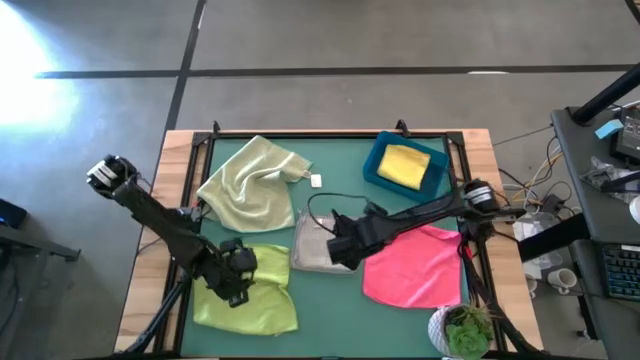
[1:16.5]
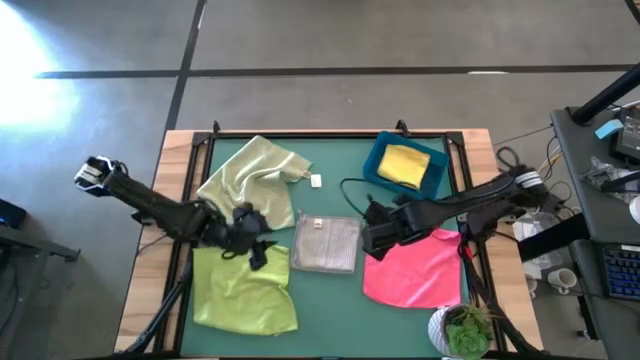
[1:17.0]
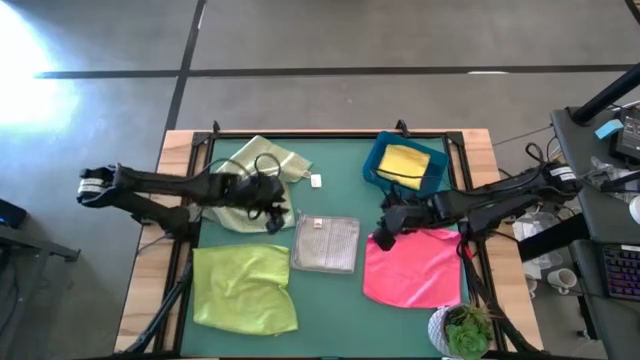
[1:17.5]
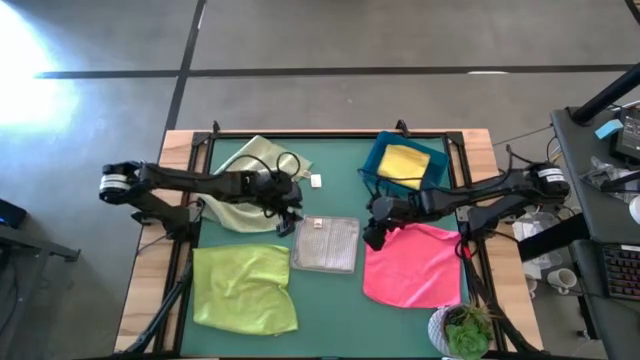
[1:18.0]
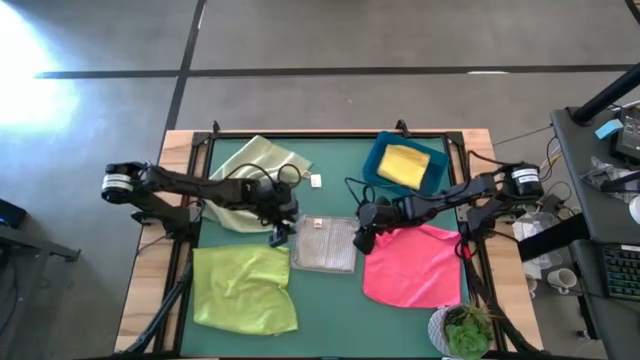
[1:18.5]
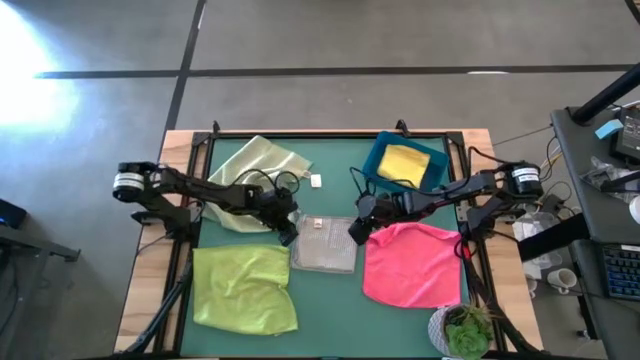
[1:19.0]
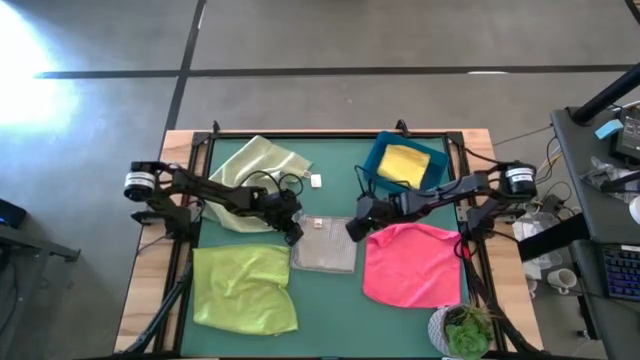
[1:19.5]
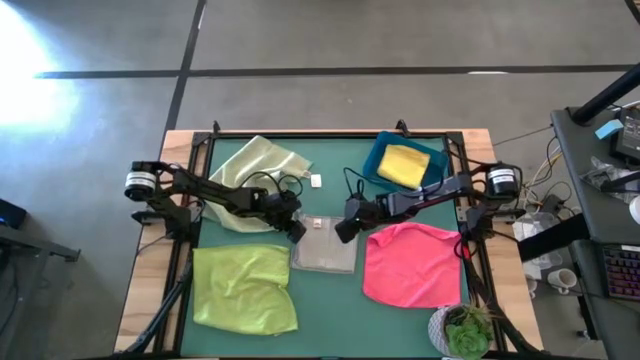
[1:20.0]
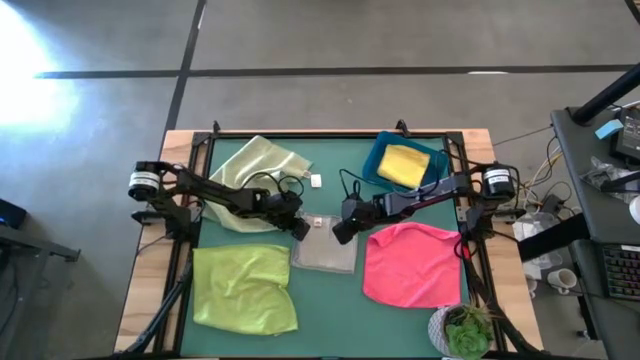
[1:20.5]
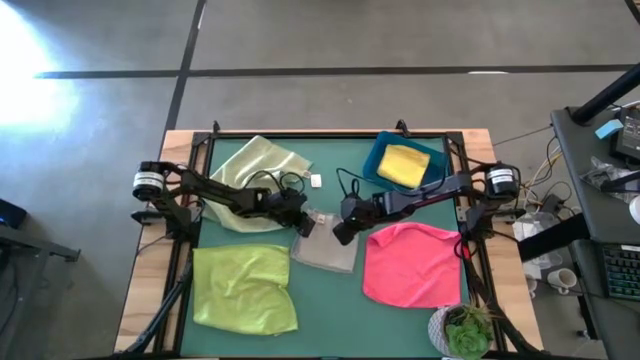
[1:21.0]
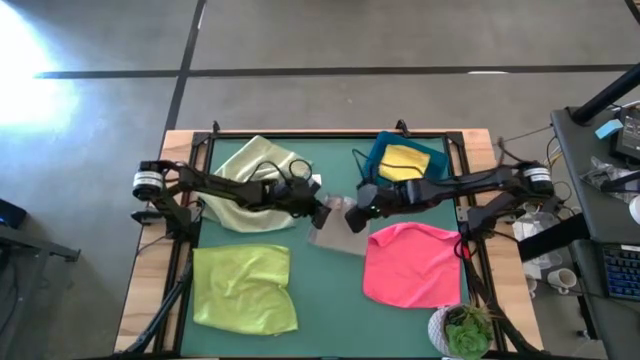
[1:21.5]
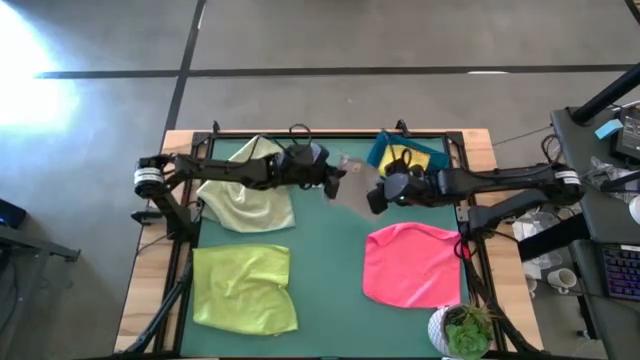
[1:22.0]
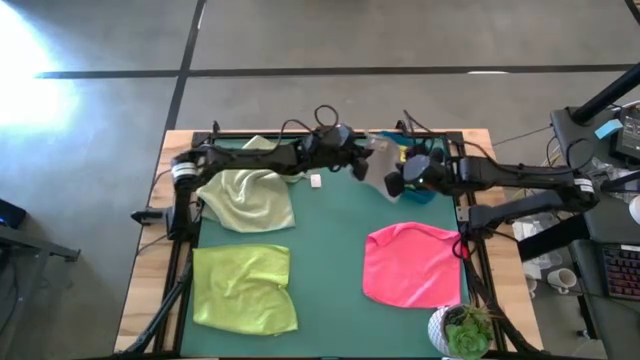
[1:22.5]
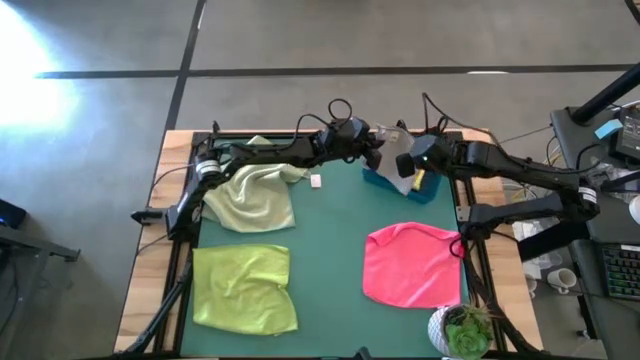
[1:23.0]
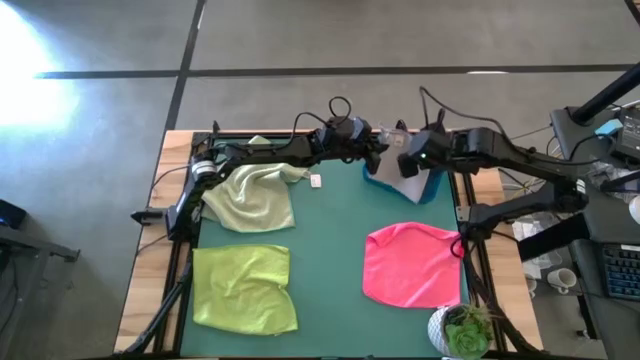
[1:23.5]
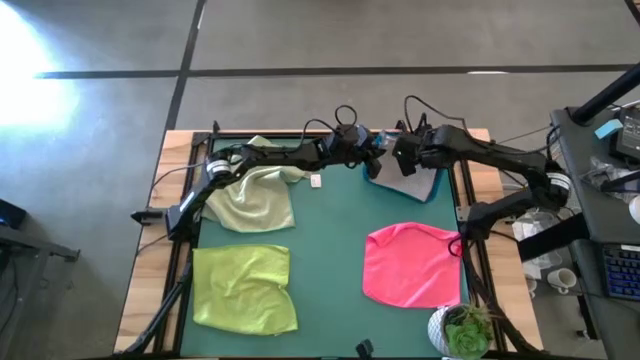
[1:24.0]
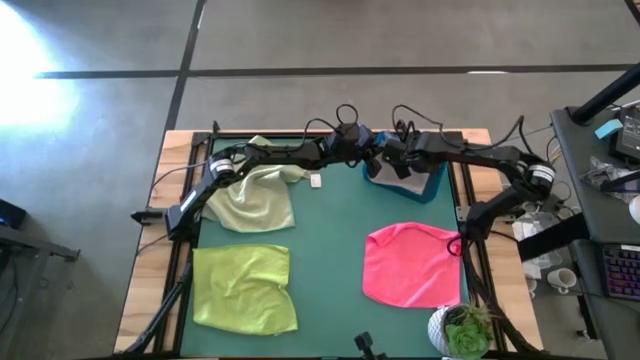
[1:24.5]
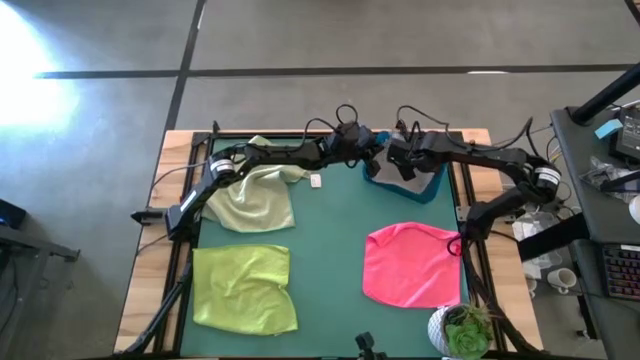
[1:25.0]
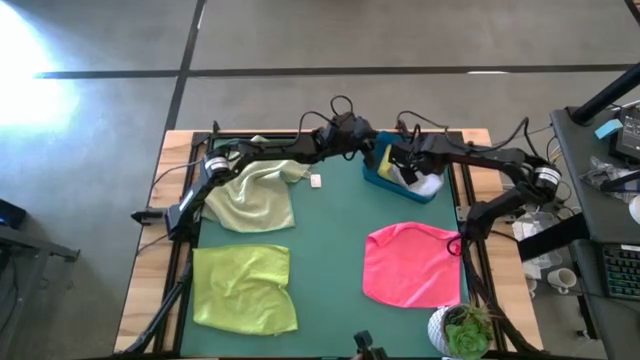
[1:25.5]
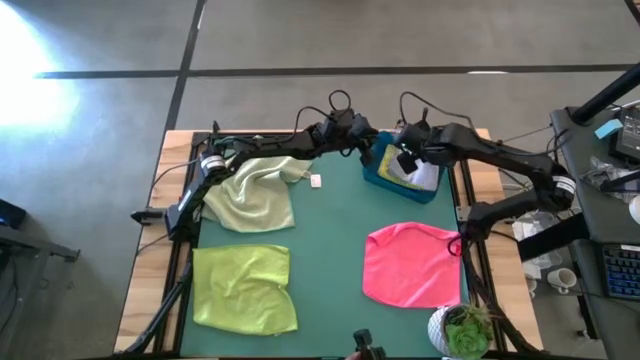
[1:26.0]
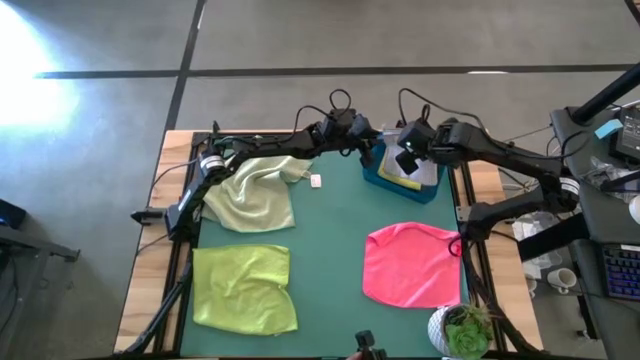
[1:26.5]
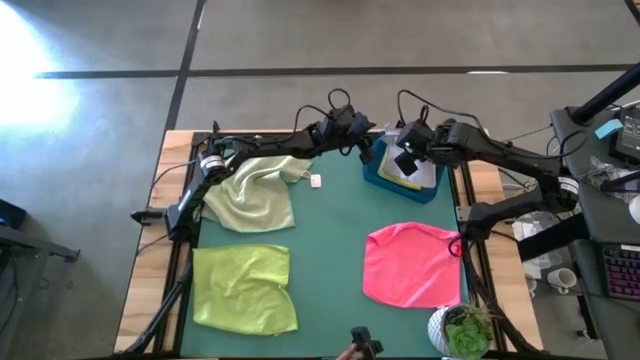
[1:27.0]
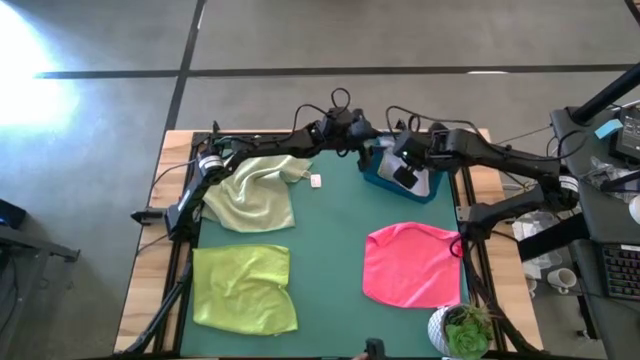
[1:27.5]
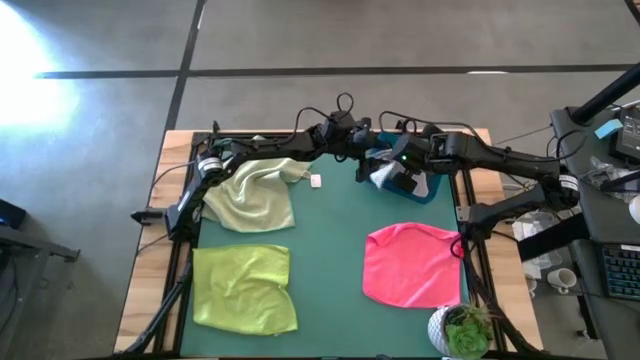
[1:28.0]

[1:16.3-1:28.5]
Task: Fold microfiber towels
Put the folded gray microfiber cloth into the blue bin

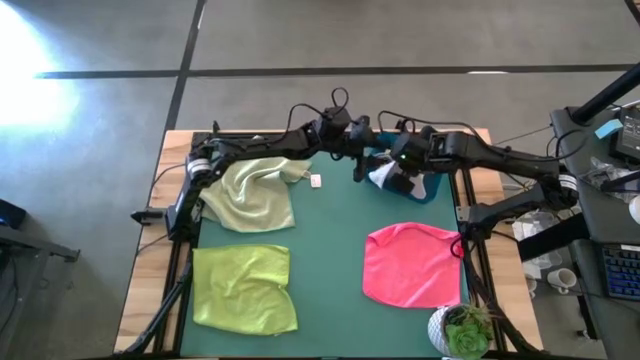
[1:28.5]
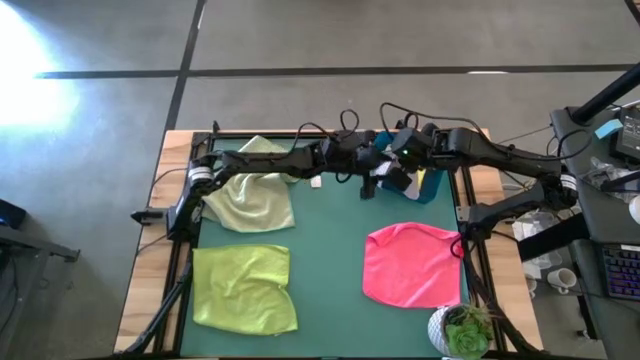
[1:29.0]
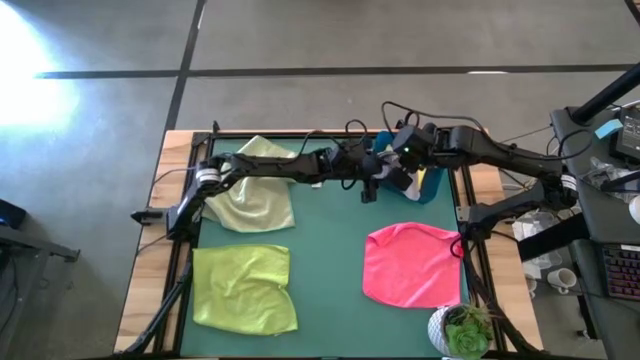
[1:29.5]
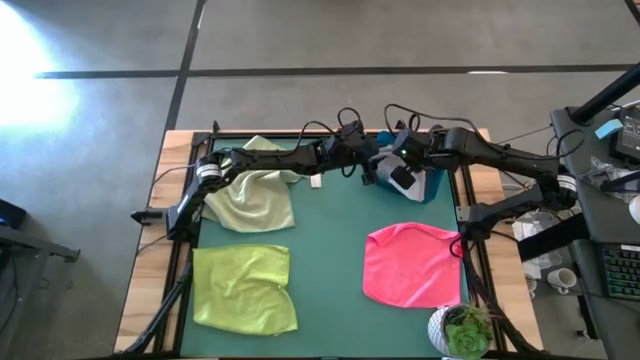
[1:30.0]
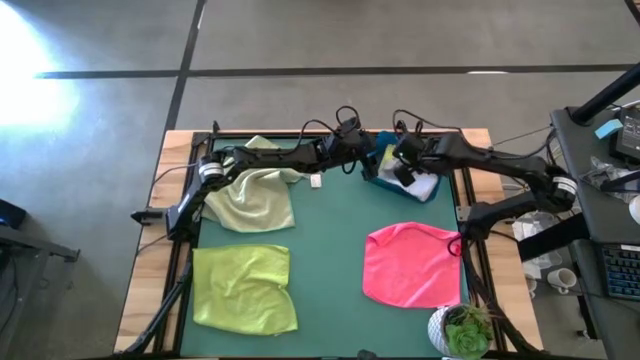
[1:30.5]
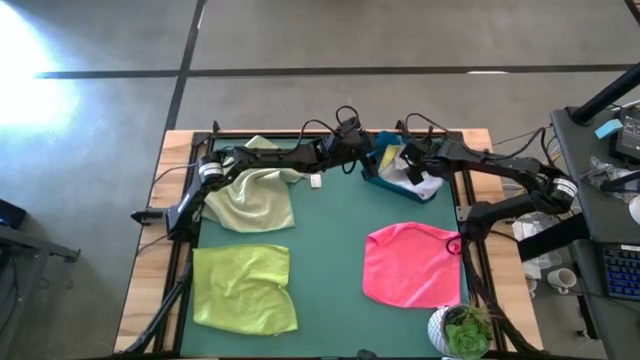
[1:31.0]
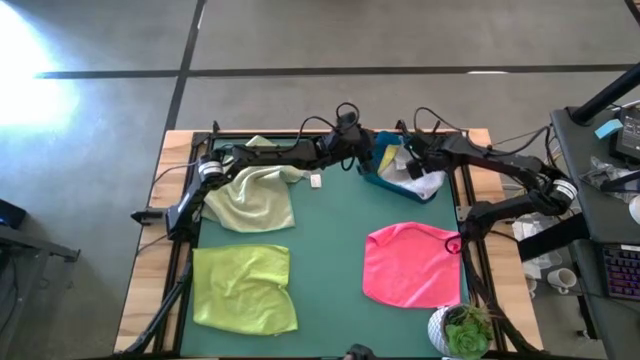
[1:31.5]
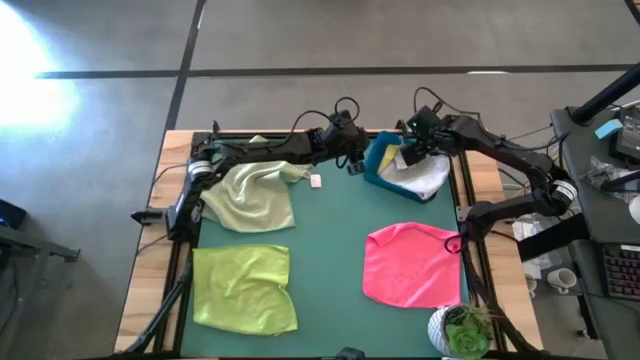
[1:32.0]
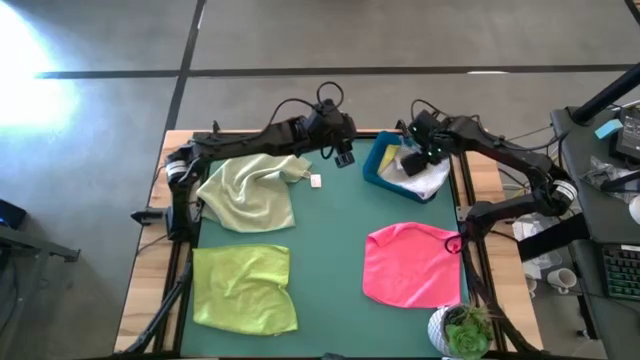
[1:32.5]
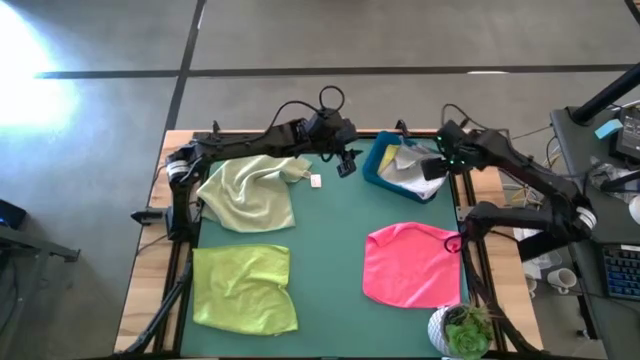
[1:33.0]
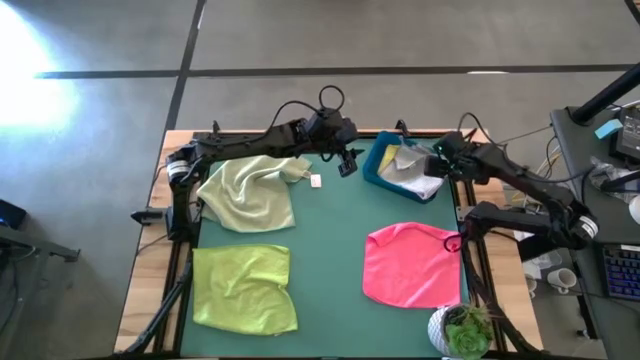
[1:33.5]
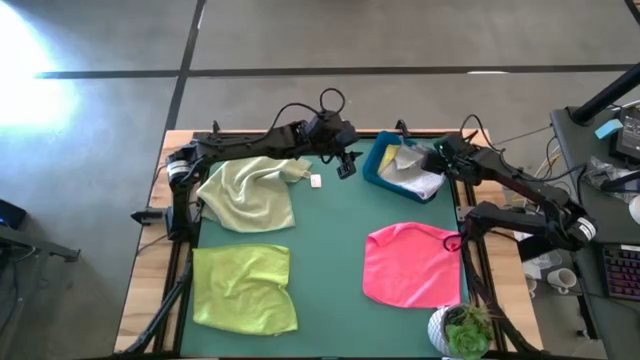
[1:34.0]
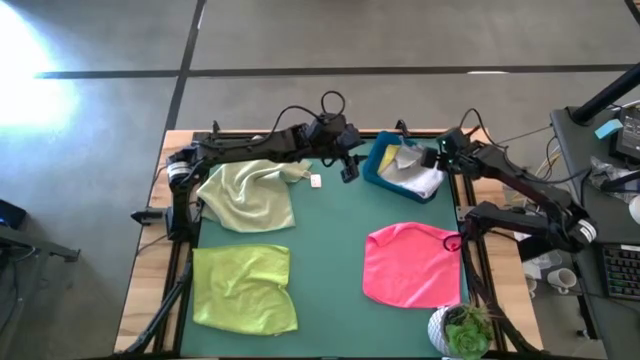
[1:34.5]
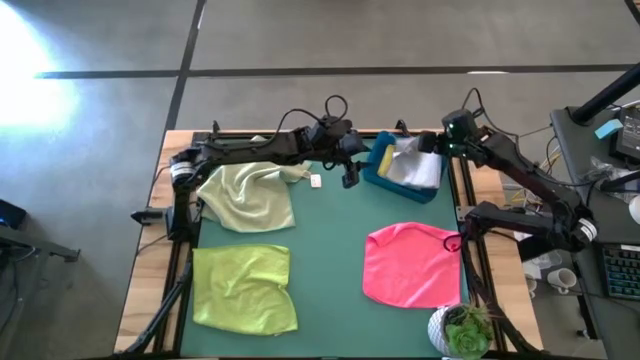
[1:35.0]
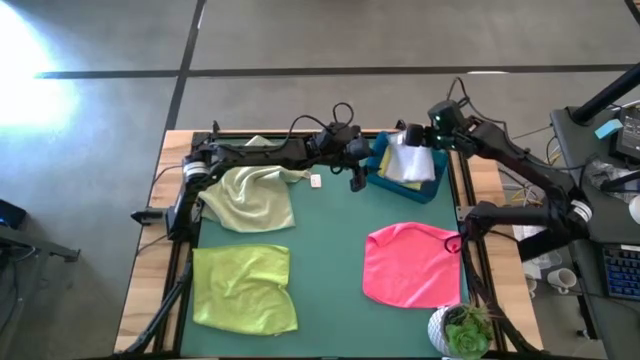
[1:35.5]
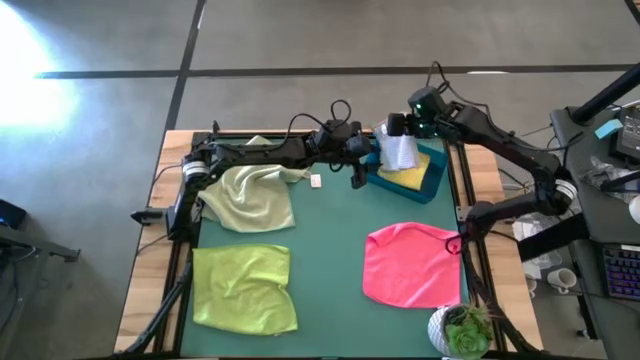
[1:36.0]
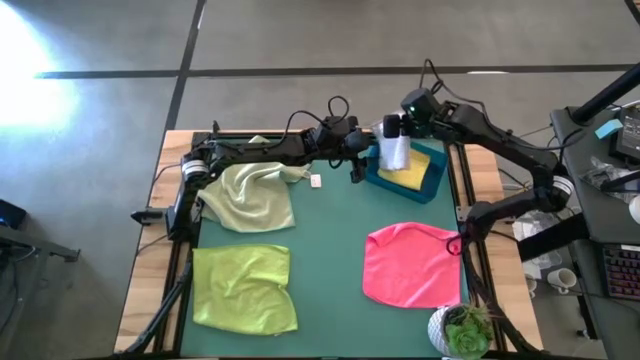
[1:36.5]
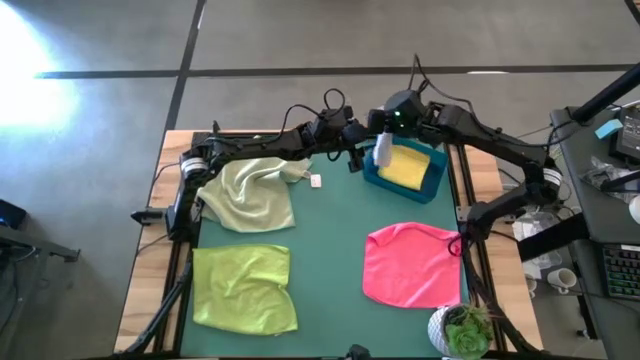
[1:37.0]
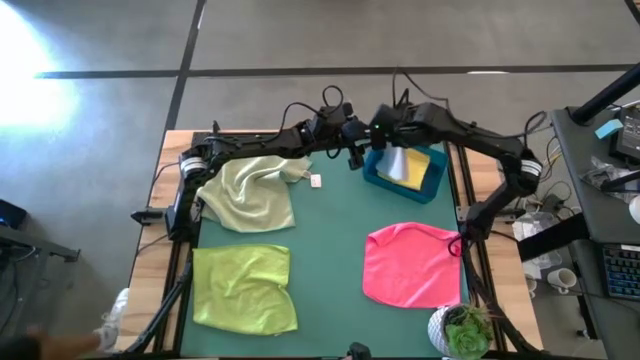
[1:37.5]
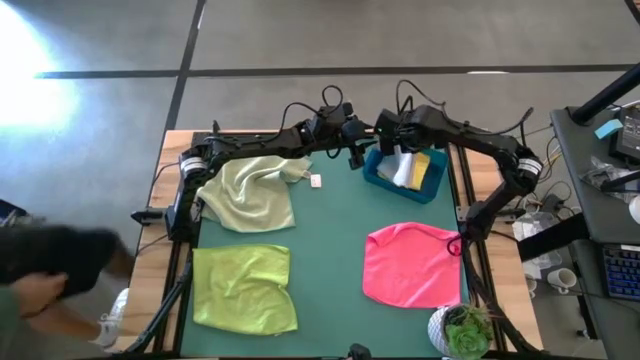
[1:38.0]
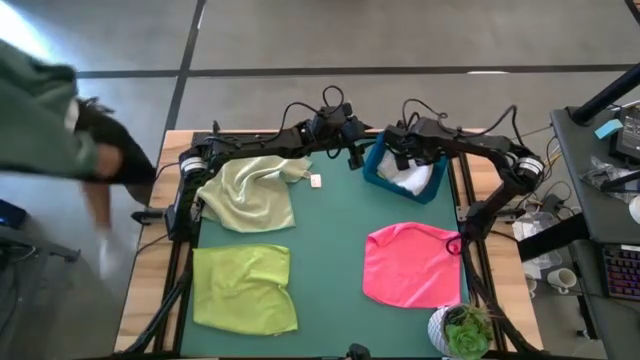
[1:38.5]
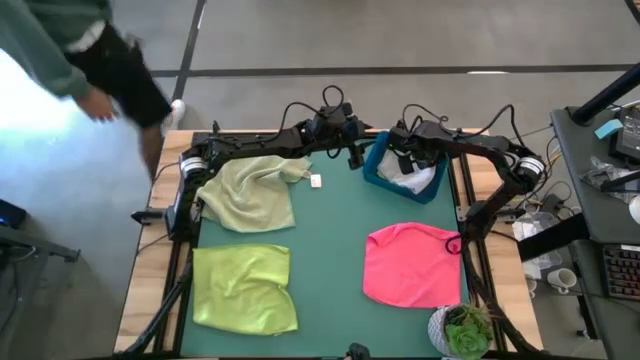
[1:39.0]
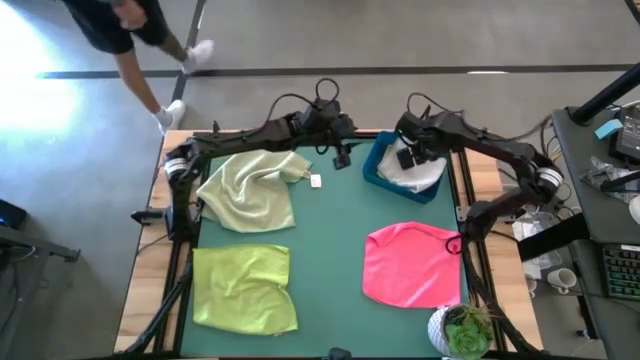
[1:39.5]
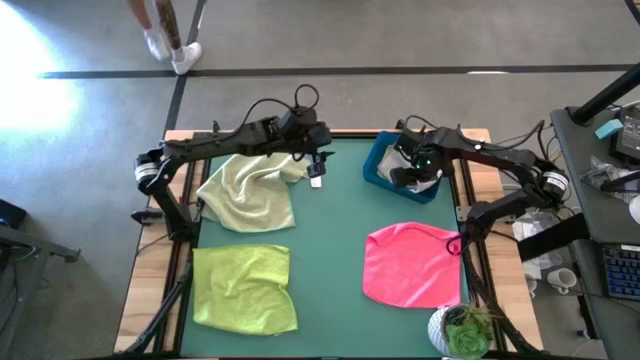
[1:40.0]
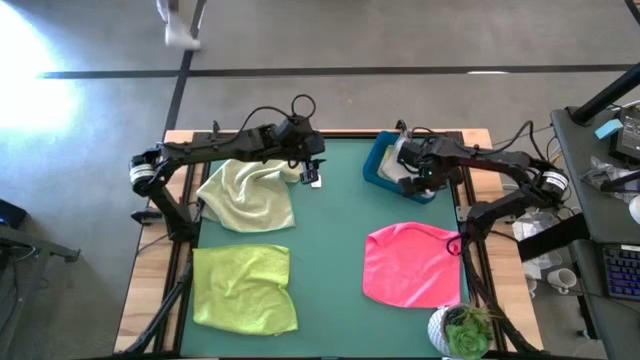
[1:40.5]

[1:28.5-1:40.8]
Put the folded gray microfiber cloth into the blue bin
